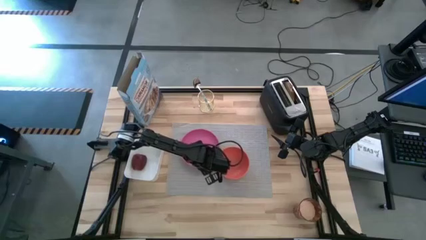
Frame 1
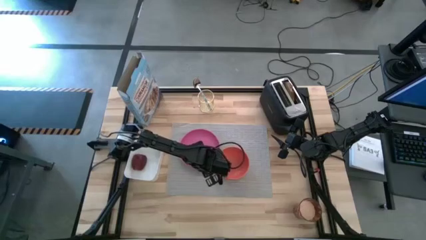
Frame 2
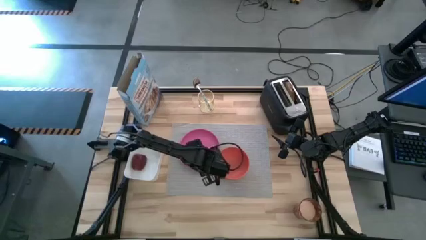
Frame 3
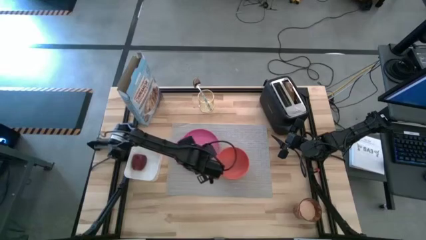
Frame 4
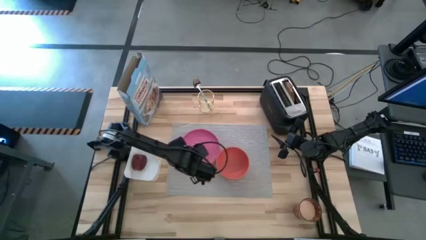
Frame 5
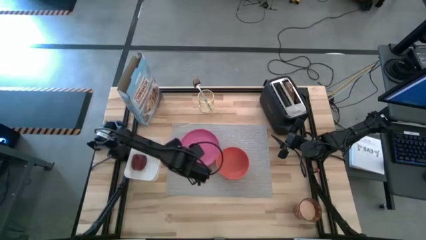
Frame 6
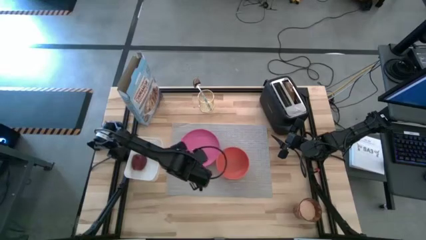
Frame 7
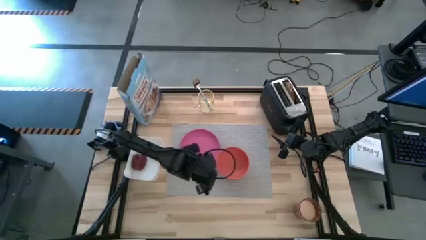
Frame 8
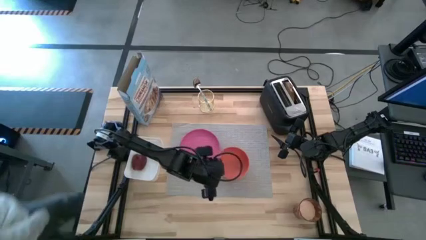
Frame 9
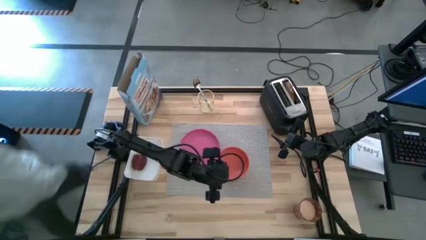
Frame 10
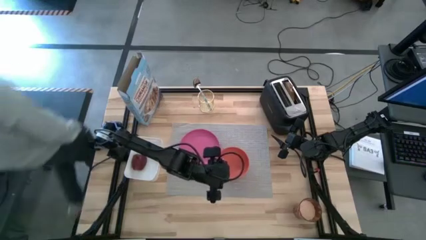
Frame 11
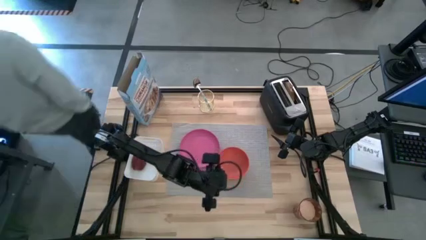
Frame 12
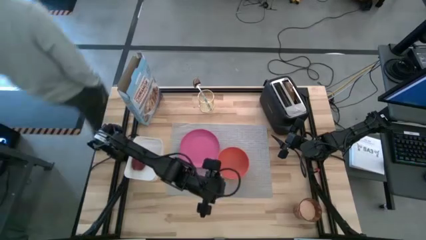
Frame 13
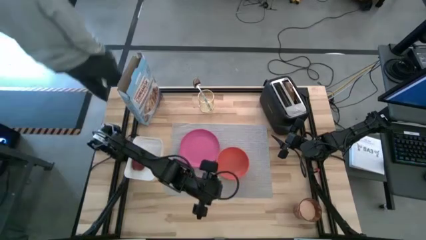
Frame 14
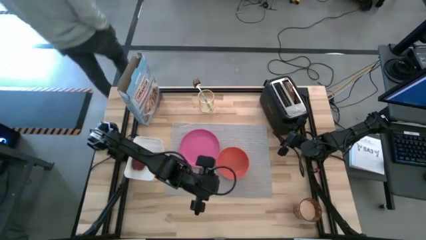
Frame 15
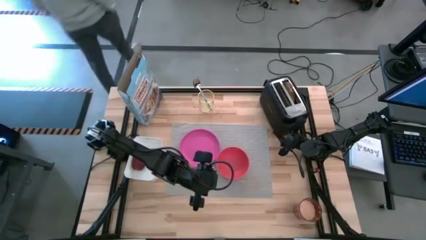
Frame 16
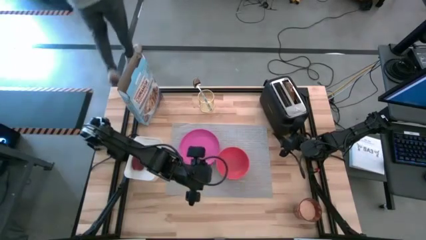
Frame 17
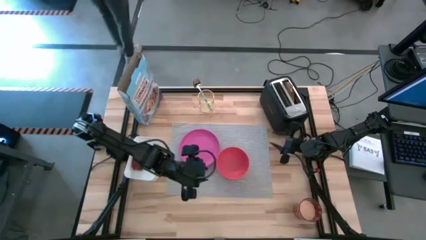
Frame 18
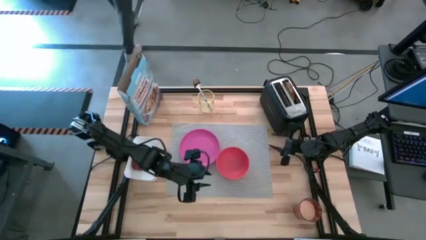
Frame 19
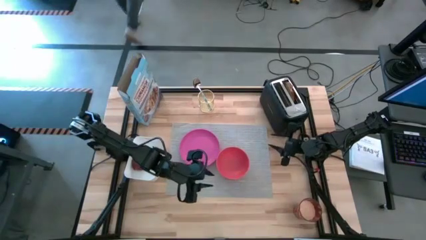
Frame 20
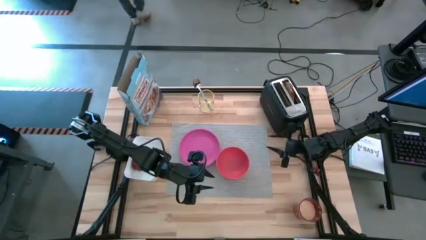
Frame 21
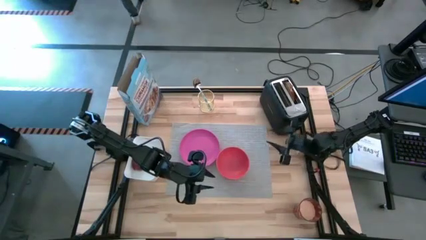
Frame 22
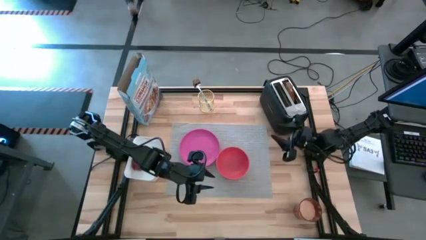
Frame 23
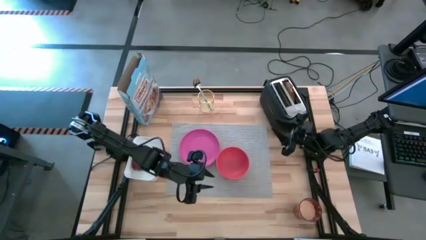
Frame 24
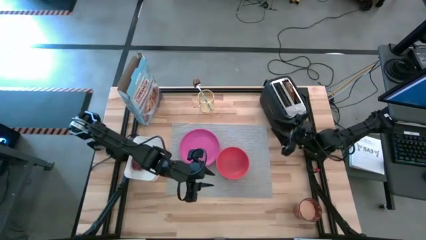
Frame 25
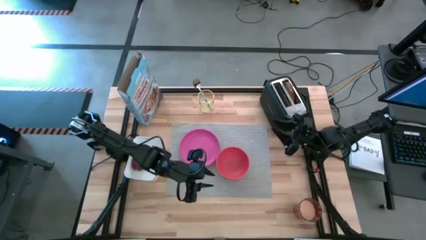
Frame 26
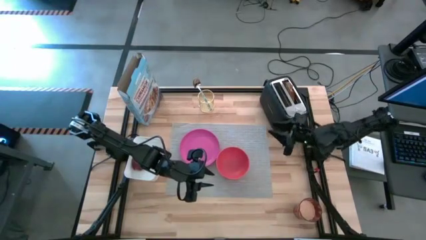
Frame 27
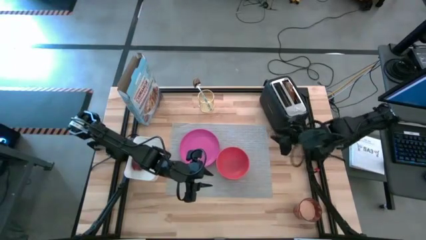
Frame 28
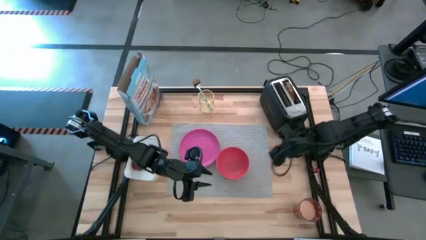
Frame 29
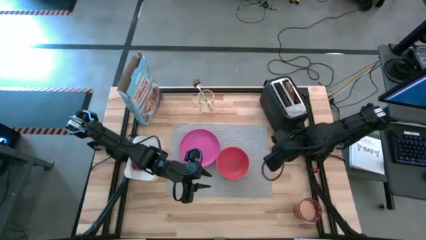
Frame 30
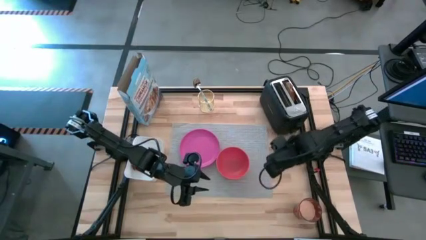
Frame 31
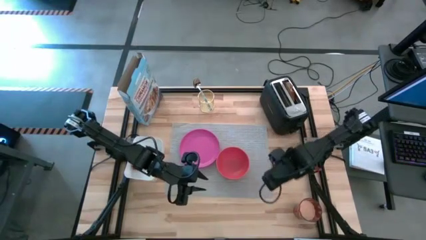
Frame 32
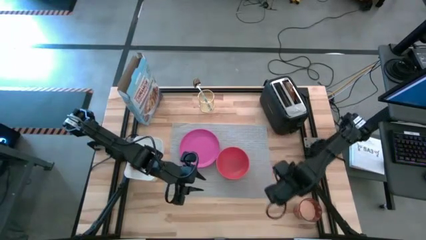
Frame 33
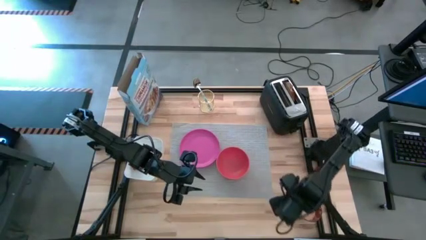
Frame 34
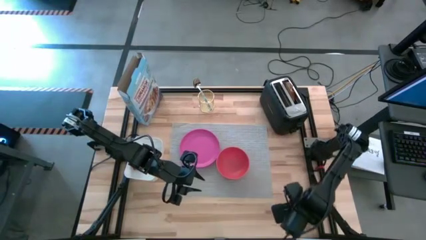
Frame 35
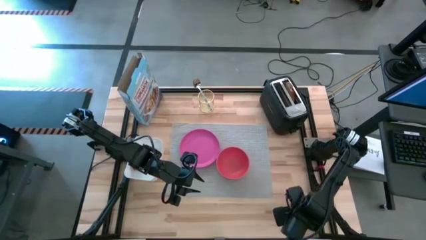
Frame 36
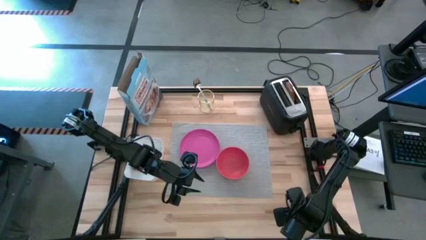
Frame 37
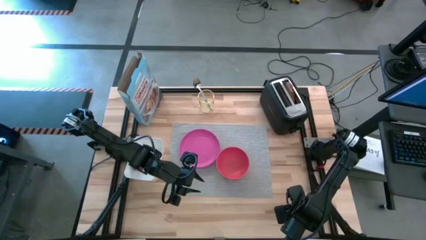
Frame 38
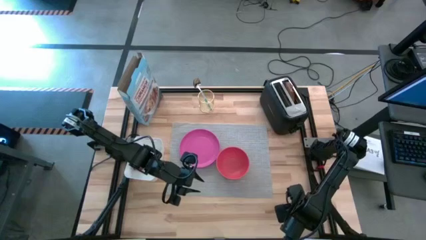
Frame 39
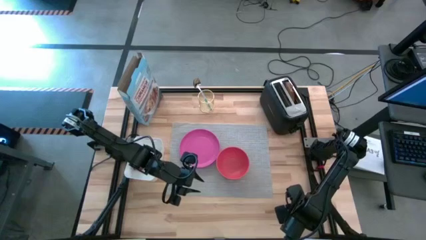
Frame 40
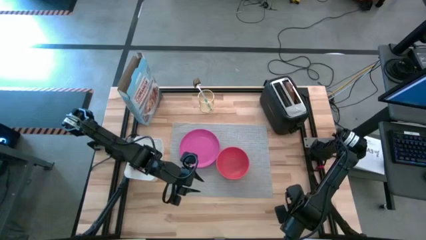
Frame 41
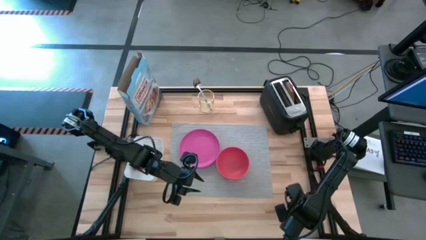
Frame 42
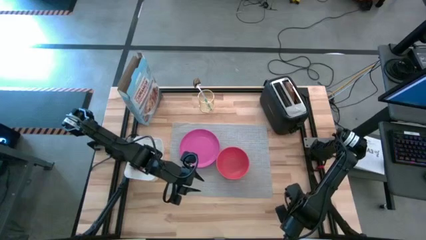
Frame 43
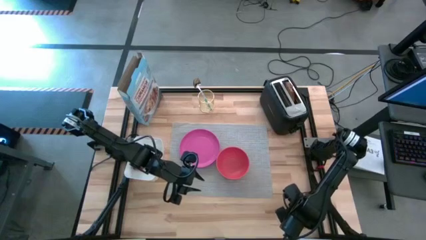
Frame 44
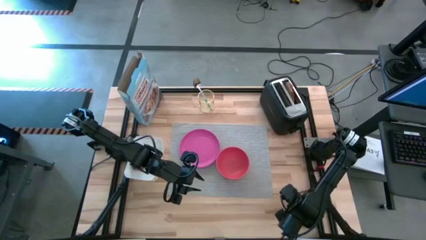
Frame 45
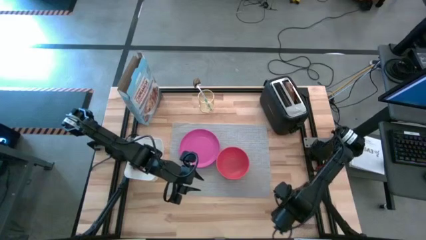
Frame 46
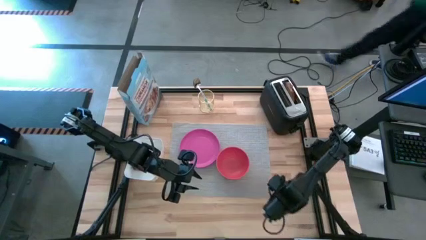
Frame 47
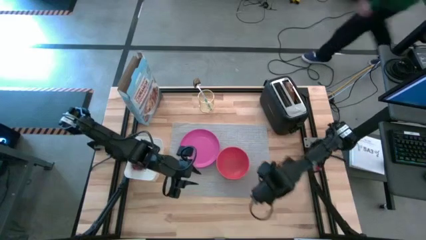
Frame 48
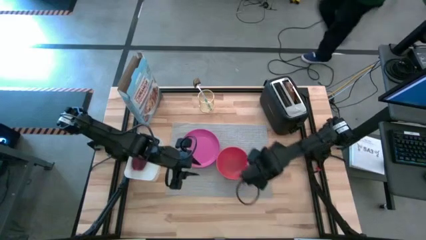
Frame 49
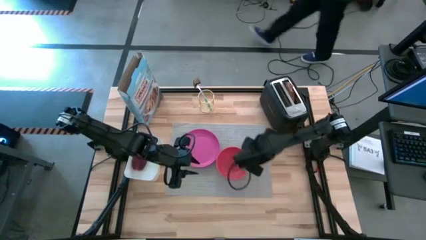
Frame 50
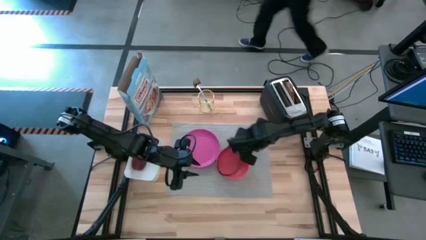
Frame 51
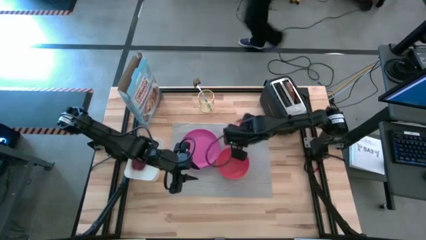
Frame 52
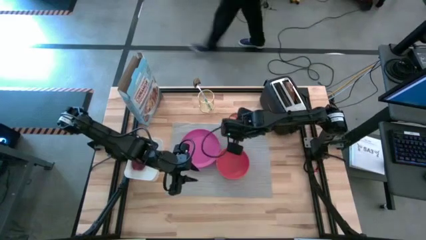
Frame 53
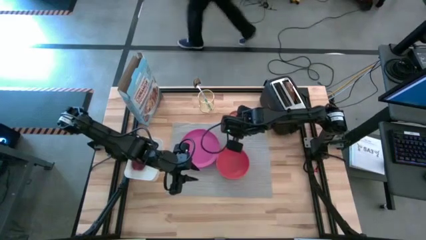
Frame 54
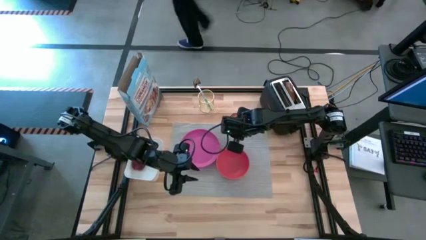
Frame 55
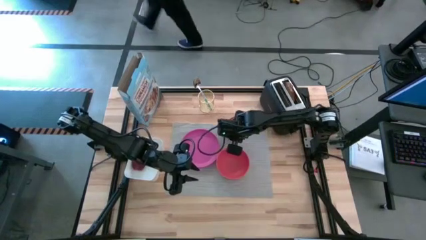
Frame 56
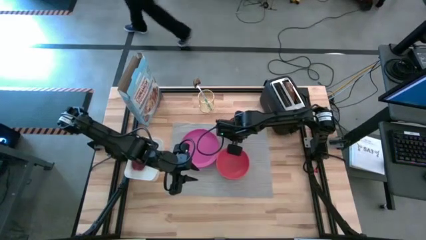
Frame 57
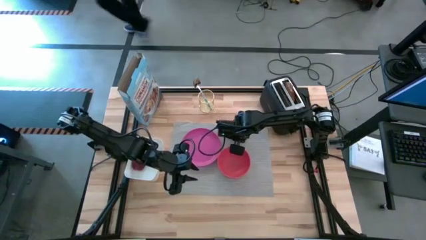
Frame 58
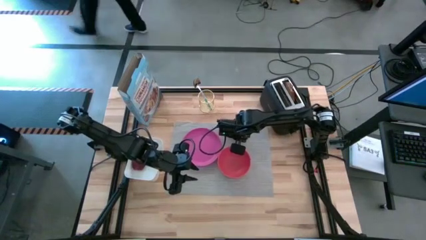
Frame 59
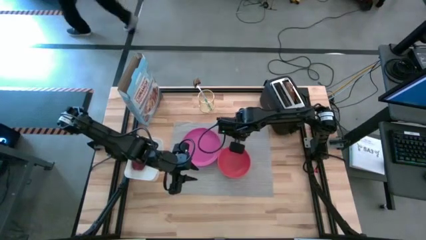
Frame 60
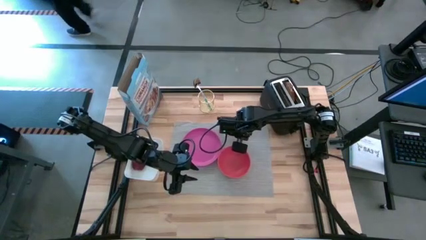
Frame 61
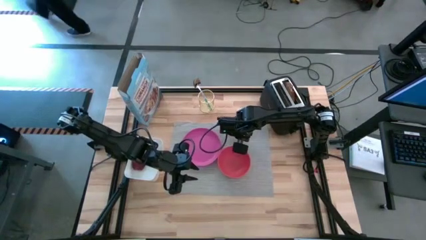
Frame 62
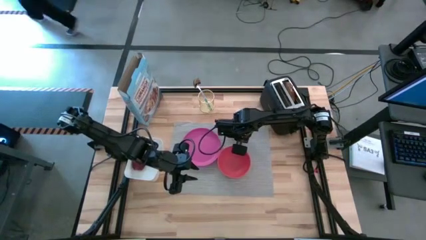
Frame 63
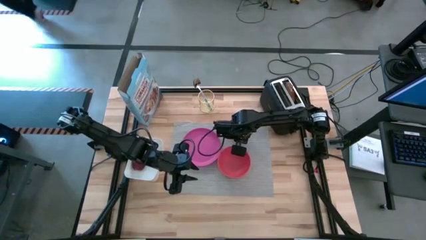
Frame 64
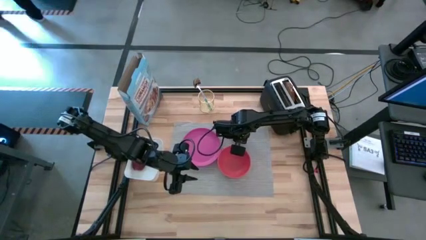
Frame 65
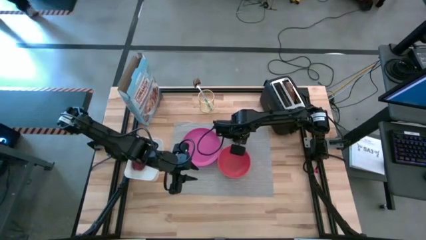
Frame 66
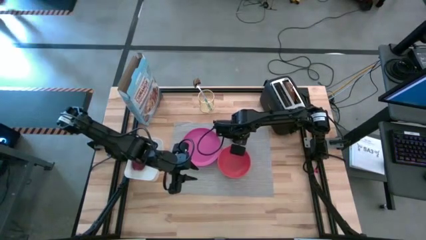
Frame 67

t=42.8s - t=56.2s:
Task: Arrange a breakfast setting
Put the glass of milk on the grey table mat to the top of the orange bowl

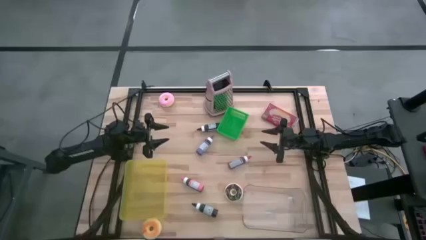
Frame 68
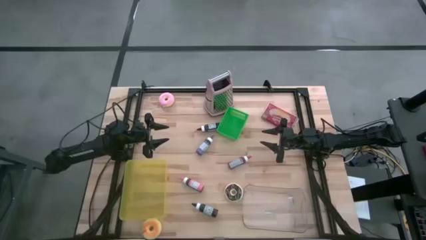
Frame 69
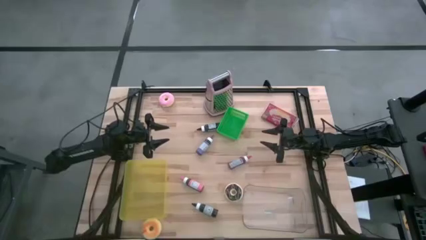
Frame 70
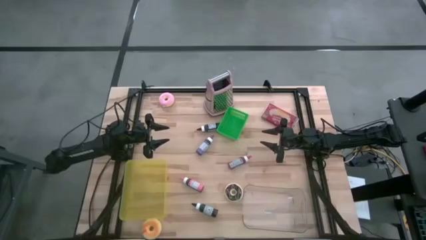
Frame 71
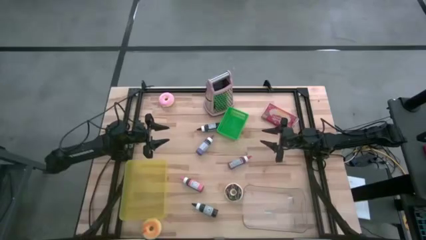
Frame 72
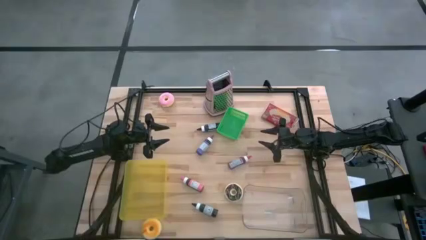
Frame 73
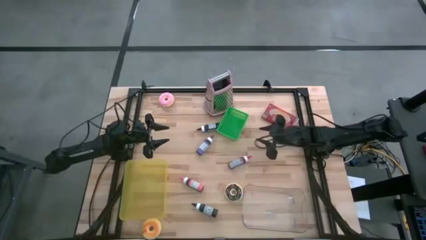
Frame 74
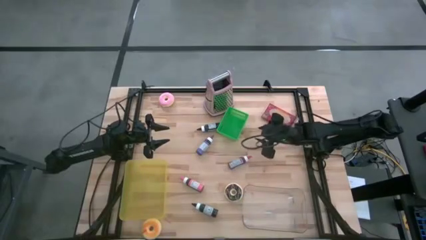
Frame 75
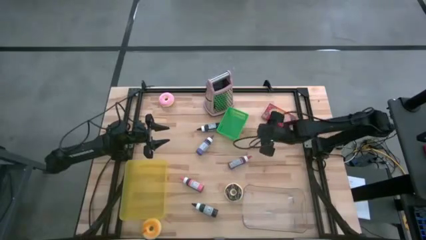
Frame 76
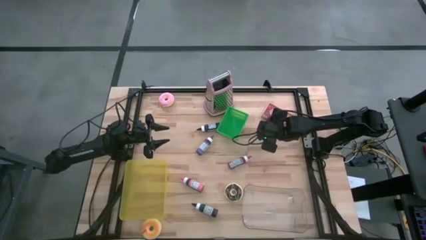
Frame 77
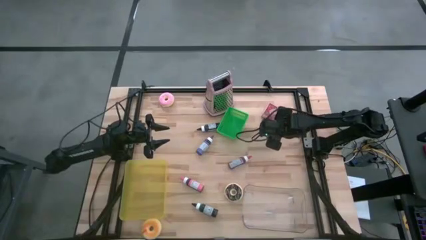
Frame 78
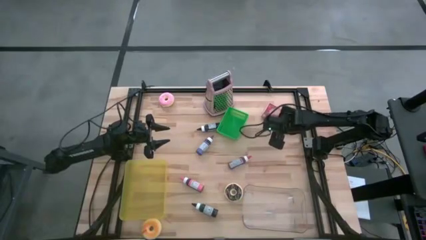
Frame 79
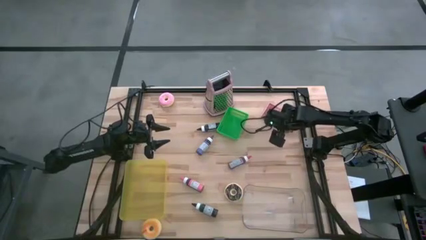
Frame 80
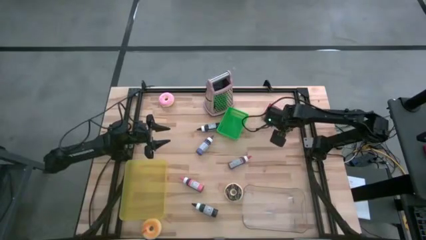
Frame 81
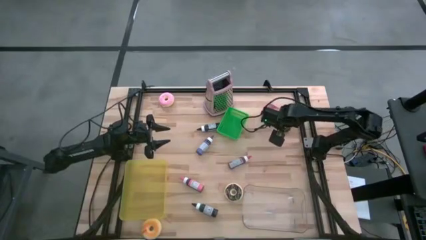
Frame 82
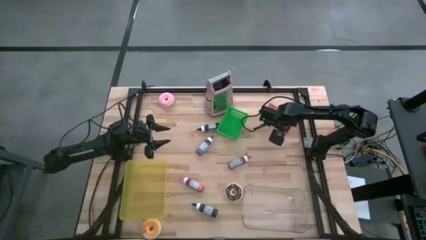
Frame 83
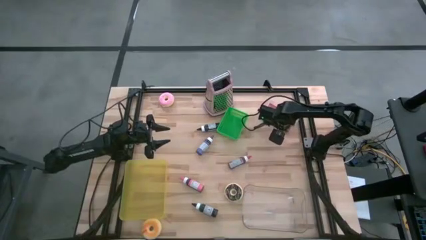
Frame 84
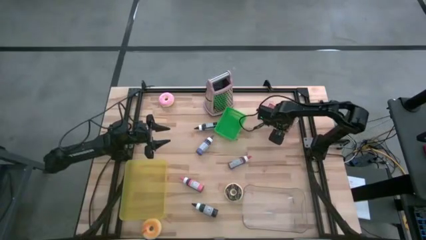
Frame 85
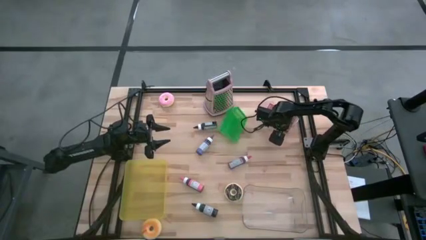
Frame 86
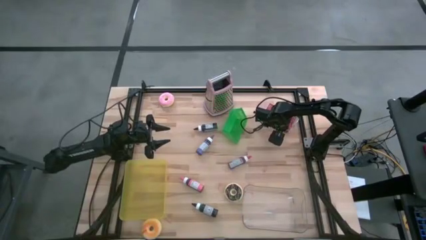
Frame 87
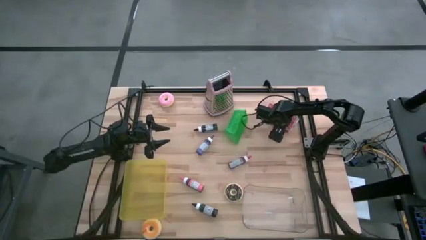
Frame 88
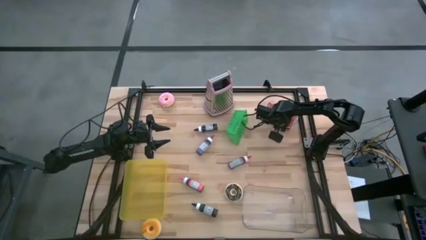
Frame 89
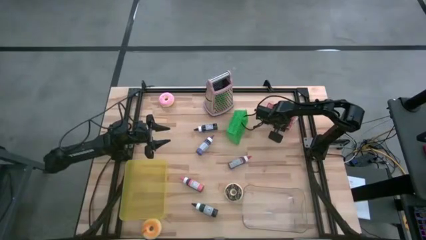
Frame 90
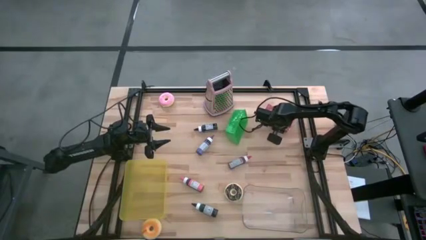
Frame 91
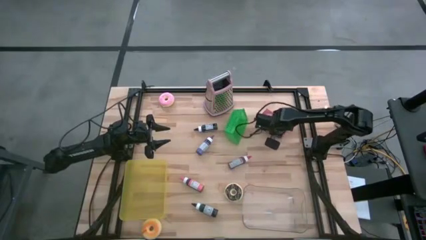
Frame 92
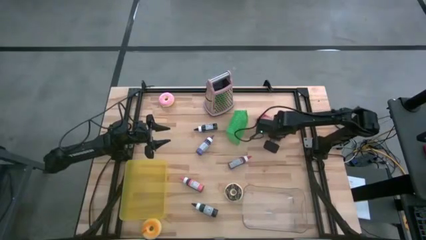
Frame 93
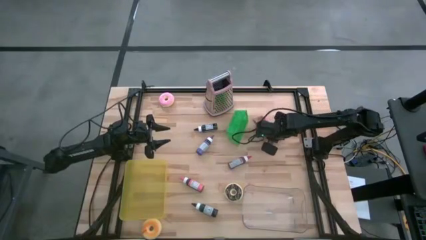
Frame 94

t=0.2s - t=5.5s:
Task: Pick & Place Food Item
Put the red popcorn pack into the transparent bin
